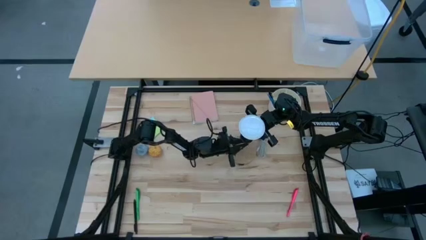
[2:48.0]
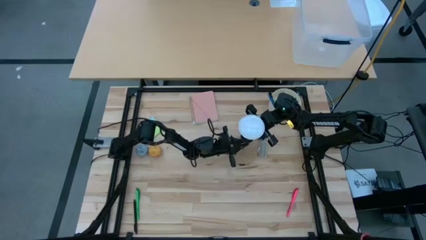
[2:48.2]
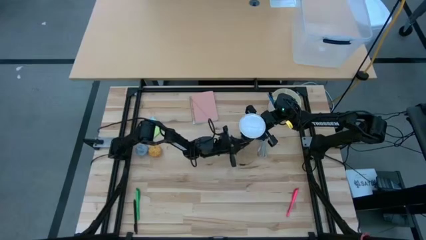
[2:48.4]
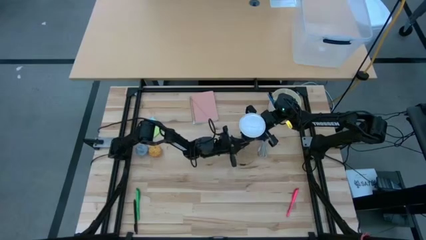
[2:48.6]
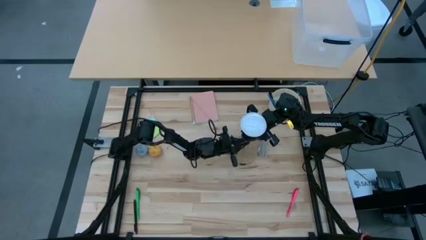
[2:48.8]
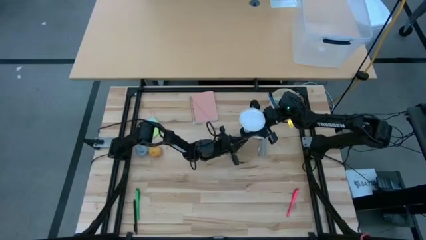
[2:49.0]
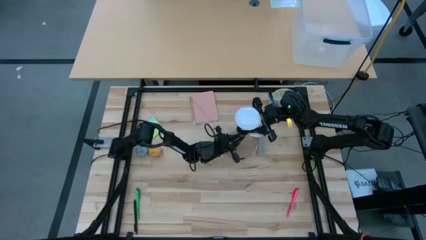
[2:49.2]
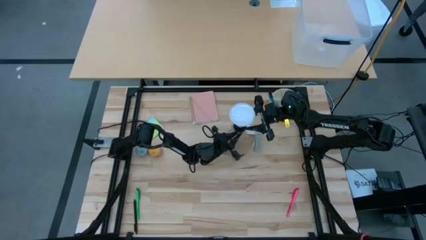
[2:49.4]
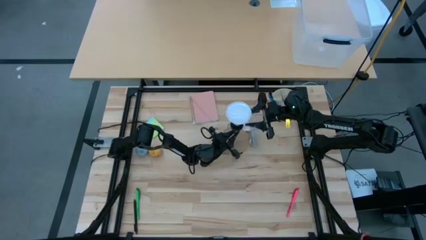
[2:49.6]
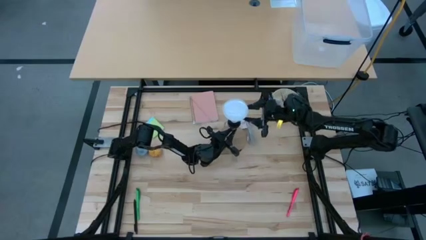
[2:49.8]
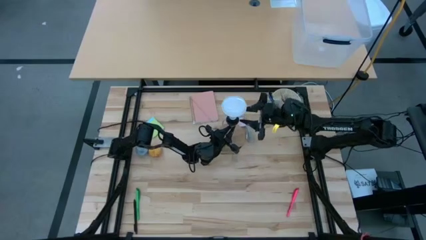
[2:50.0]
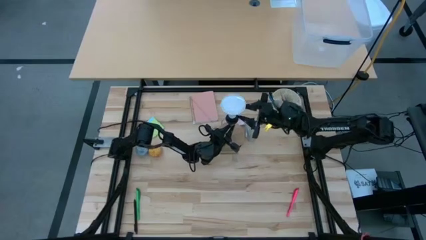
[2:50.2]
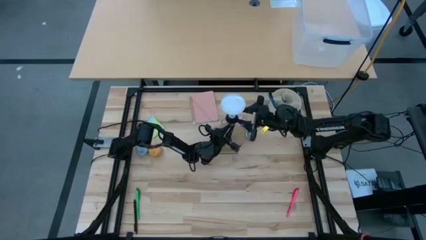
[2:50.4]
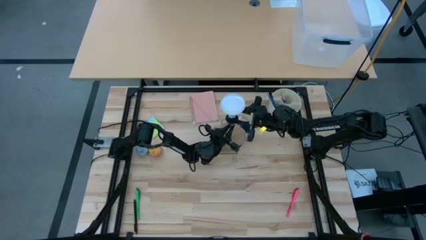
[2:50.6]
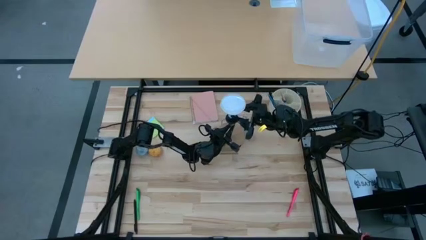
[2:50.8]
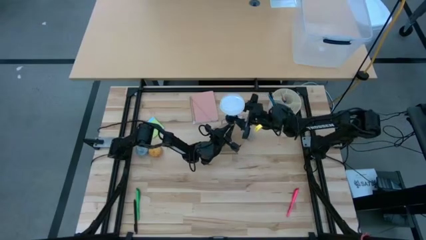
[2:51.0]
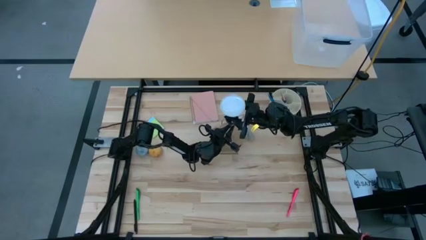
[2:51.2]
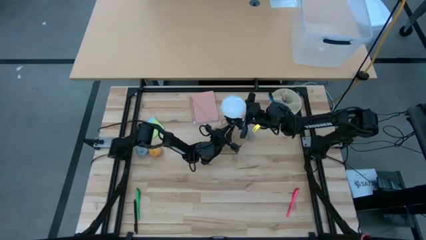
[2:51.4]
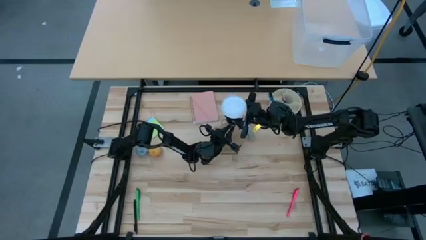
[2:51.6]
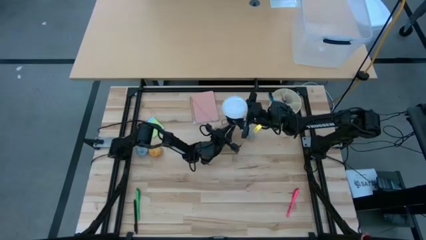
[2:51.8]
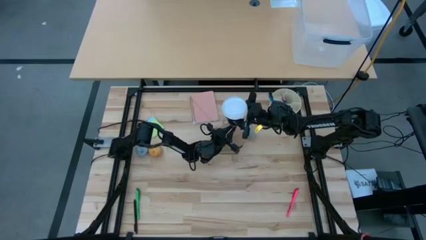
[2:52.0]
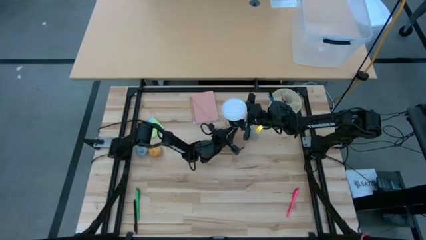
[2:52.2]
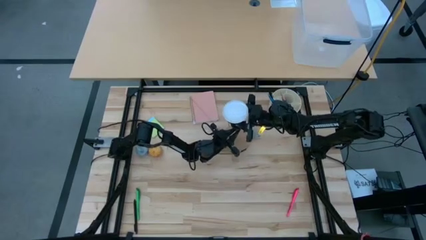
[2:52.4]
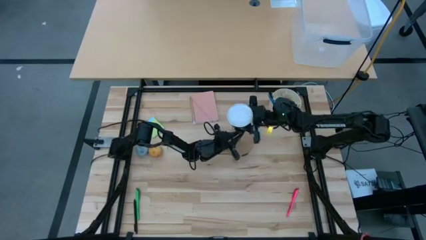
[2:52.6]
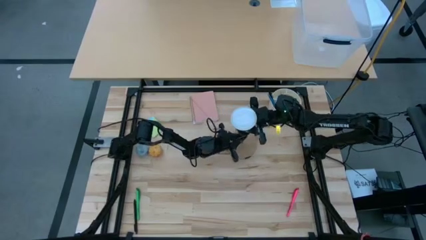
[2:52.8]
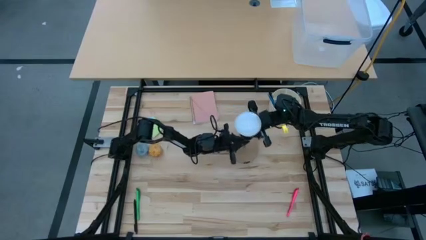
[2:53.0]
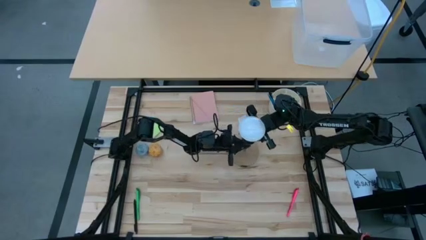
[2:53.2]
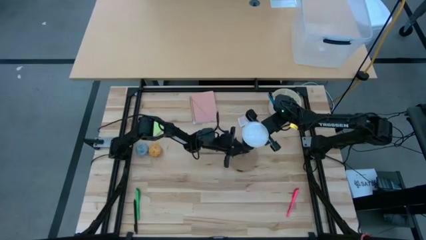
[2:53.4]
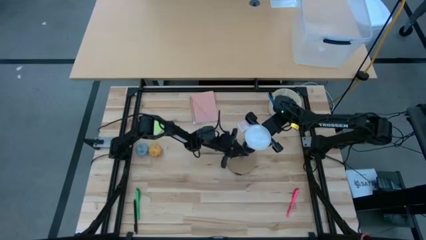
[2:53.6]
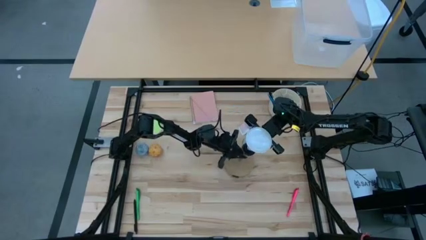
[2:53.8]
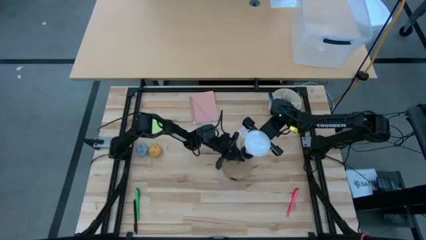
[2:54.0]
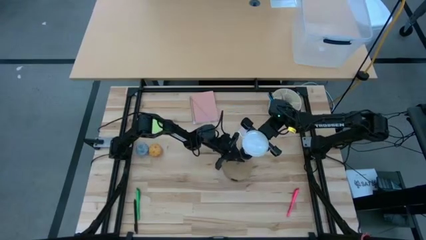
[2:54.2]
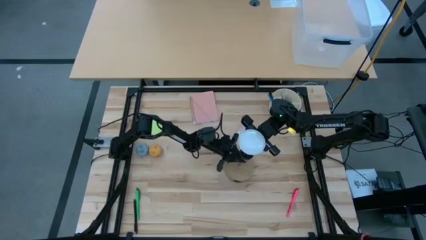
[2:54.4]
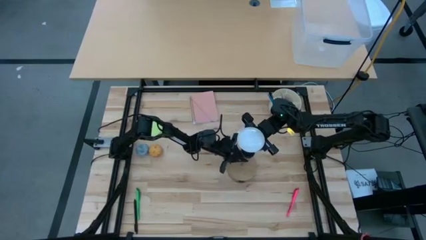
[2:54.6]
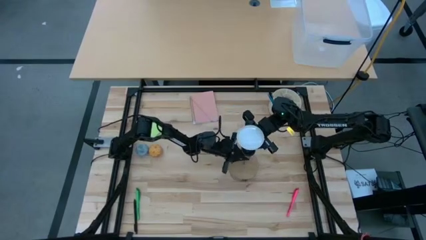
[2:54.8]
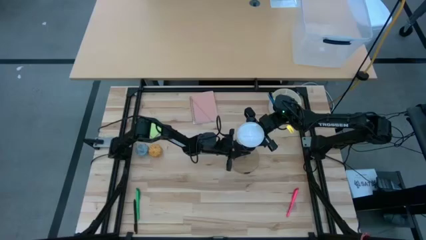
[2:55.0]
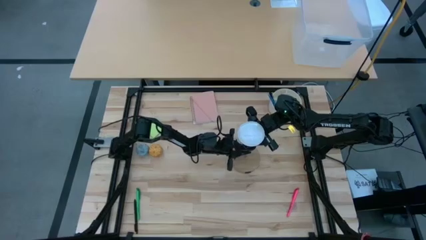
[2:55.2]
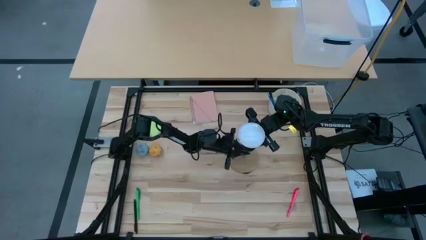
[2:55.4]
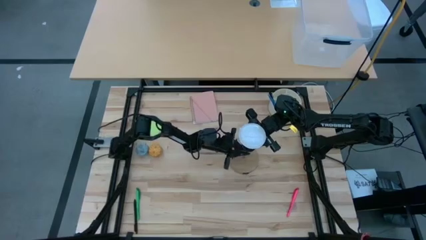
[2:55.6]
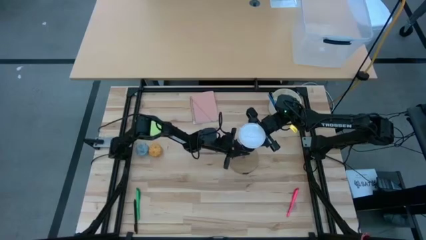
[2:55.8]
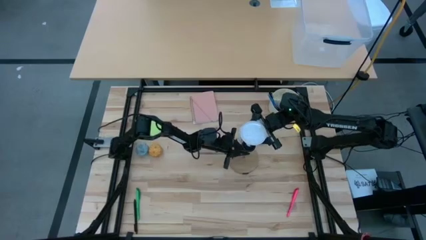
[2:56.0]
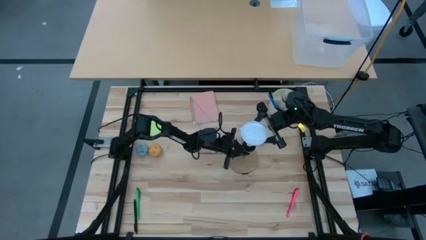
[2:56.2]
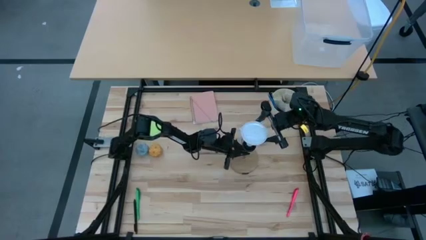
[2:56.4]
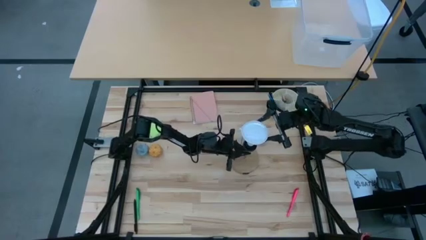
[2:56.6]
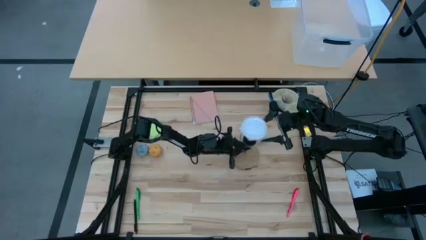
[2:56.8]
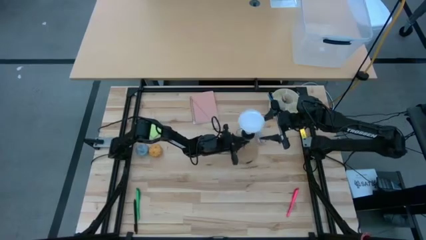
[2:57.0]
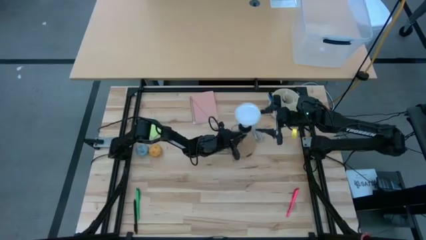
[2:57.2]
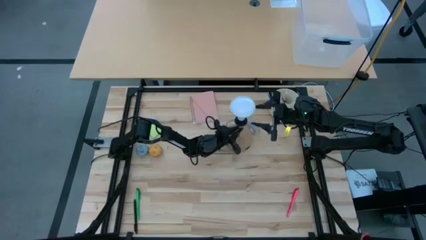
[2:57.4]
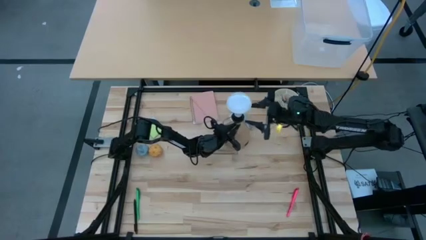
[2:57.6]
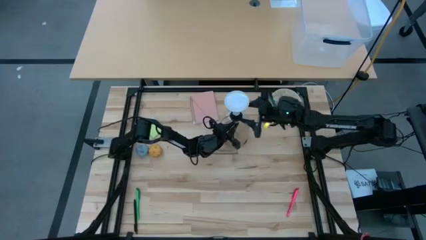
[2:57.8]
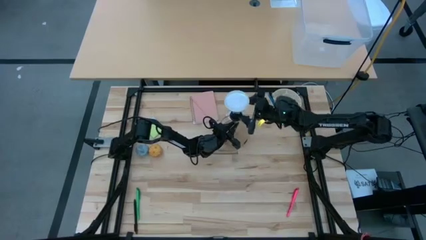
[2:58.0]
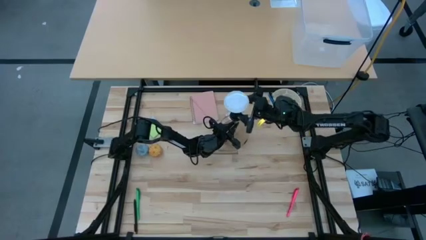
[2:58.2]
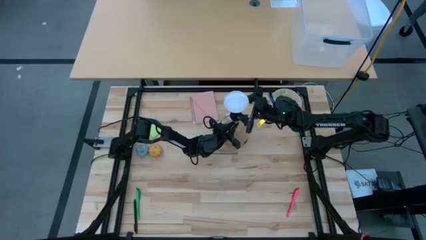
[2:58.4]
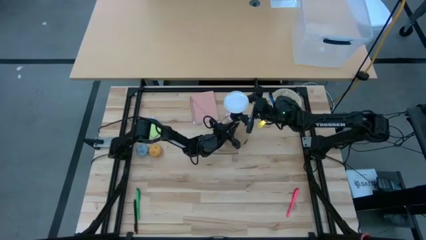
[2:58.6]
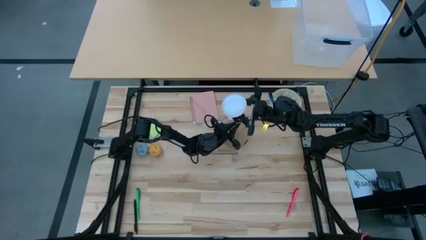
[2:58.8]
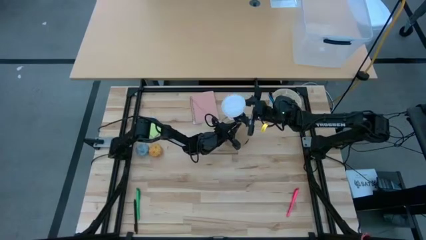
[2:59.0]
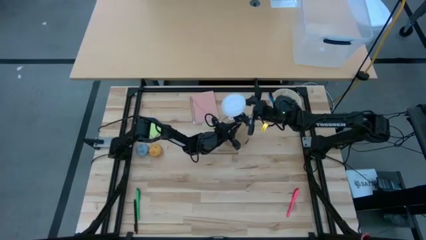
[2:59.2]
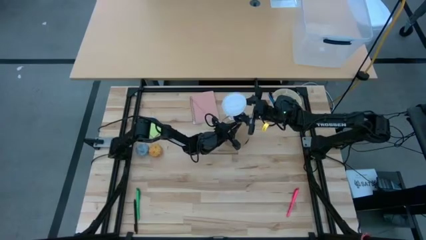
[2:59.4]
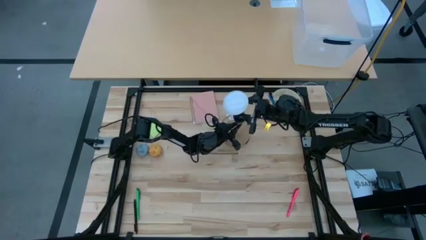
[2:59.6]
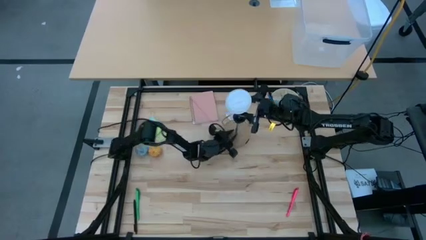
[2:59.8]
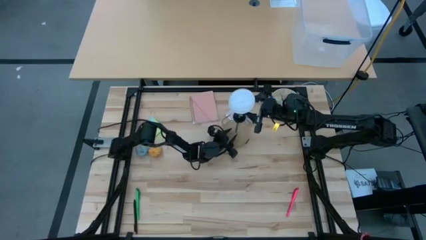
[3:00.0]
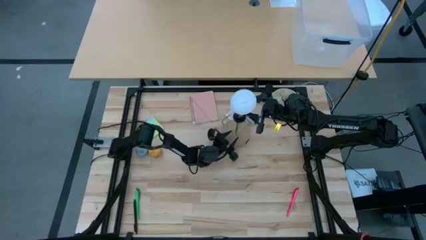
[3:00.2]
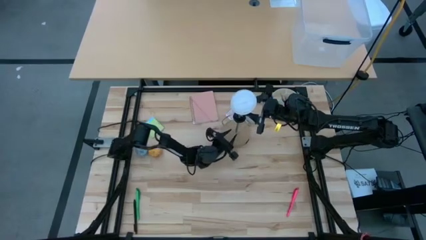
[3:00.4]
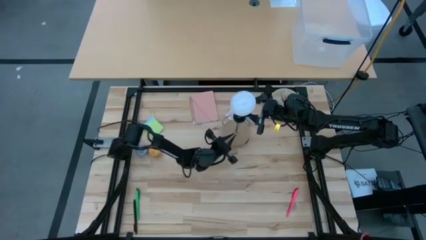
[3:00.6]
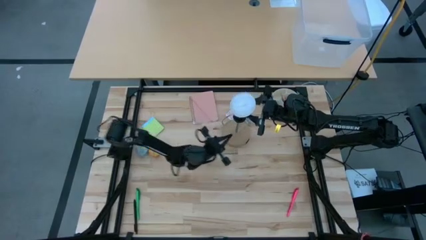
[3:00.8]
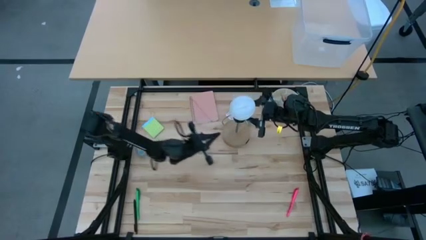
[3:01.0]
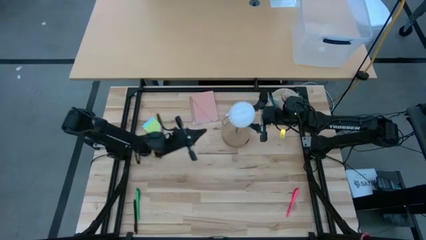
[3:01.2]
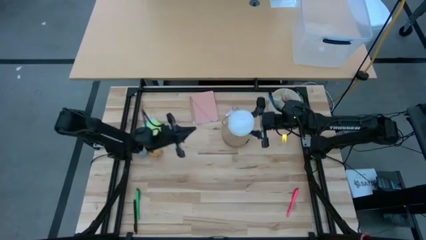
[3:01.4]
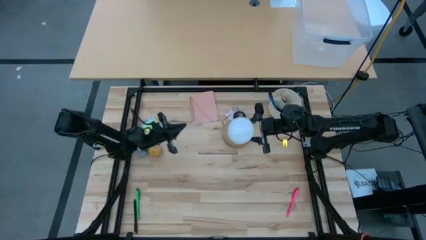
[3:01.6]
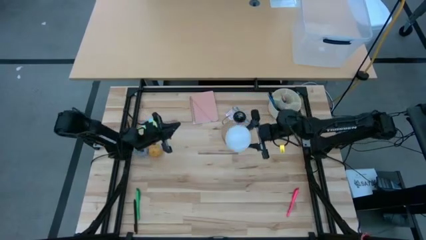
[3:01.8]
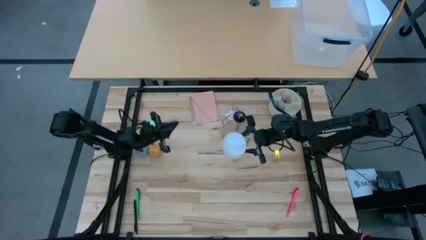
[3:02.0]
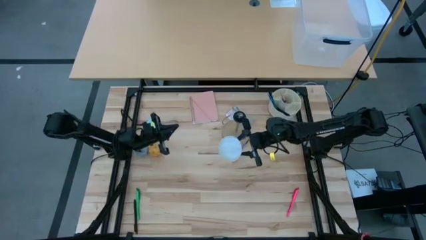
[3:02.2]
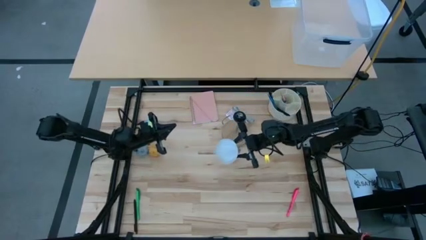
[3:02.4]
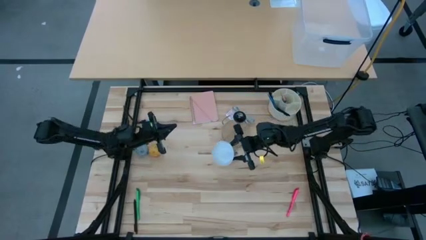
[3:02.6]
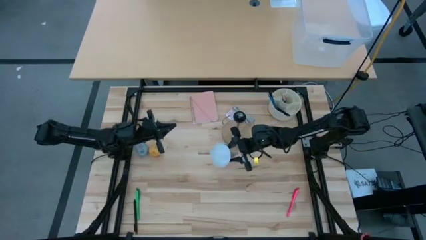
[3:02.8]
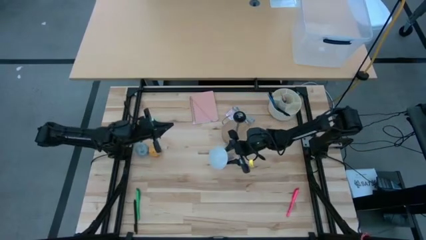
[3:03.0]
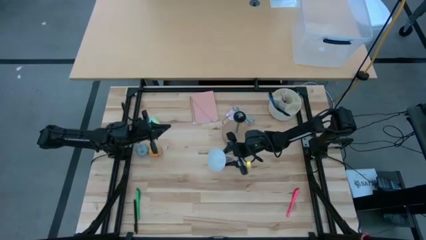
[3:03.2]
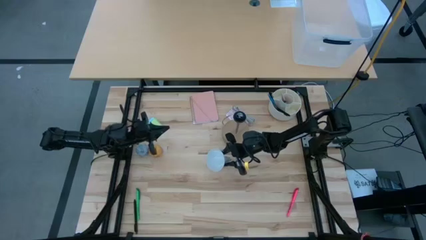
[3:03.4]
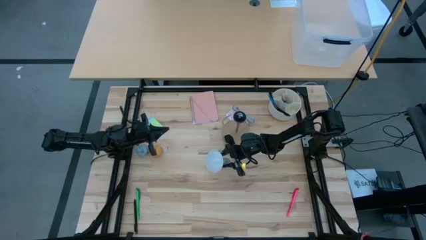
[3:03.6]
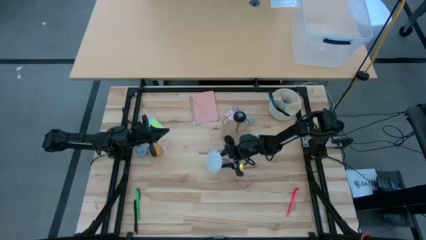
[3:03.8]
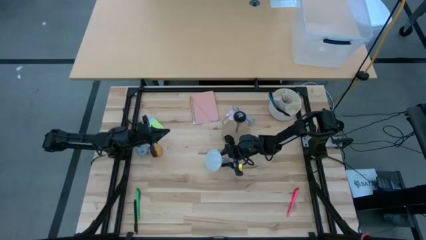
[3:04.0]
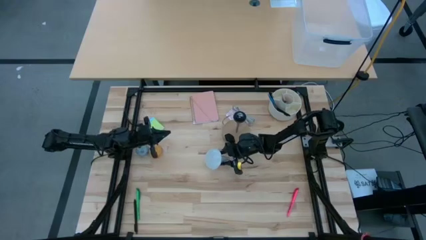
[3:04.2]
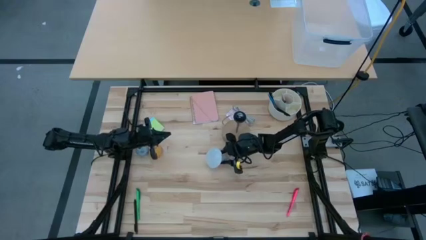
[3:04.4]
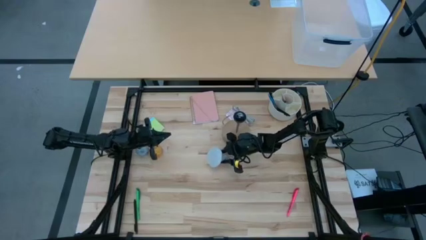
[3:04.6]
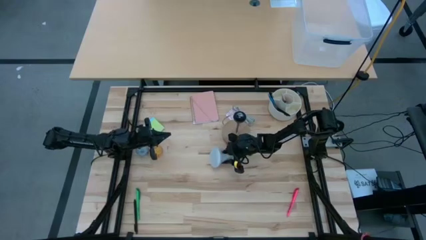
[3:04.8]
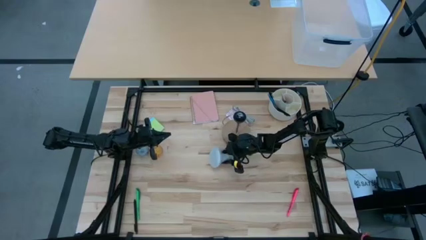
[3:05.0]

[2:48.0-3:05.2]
Task: Screw lightbulb
Remove the lightbulb from the lamp
